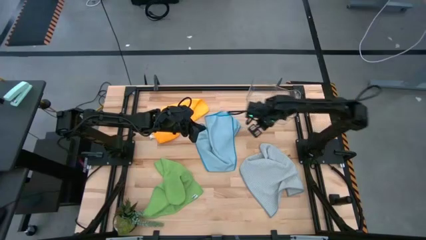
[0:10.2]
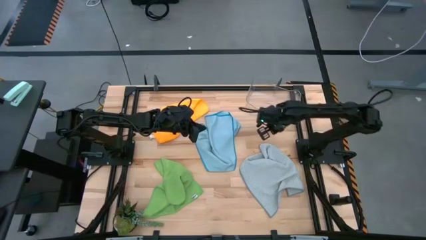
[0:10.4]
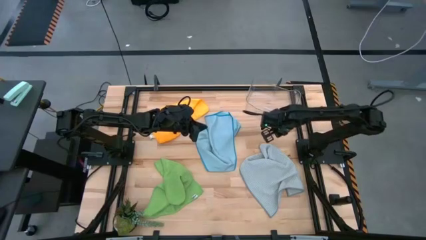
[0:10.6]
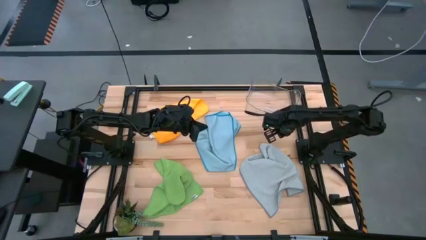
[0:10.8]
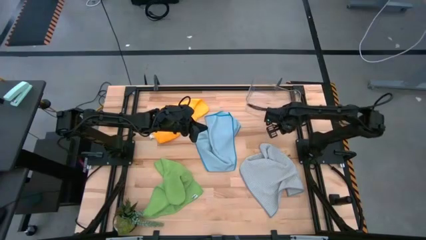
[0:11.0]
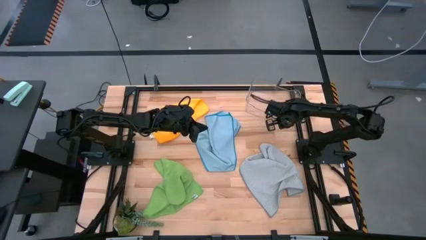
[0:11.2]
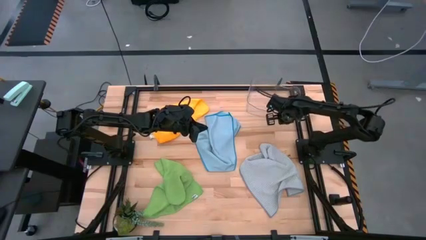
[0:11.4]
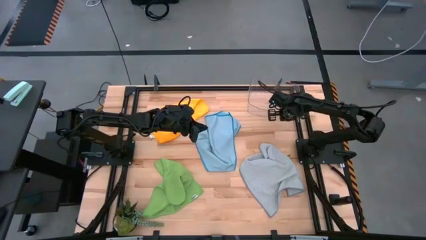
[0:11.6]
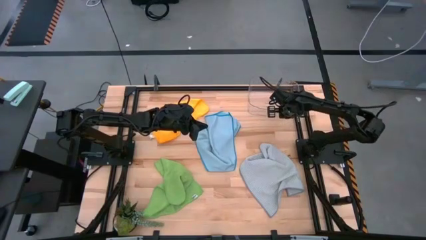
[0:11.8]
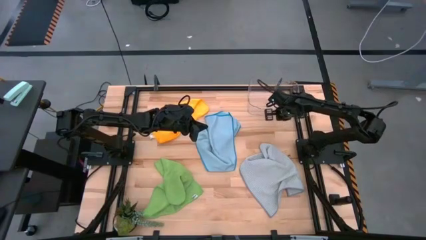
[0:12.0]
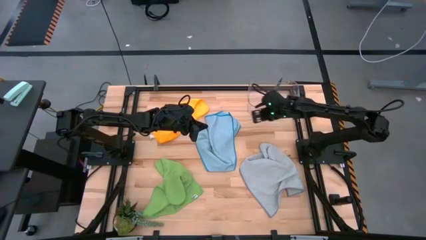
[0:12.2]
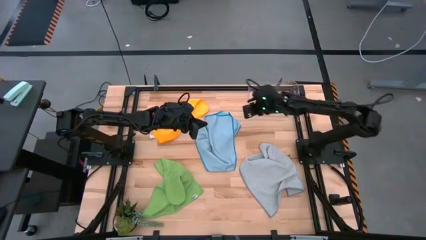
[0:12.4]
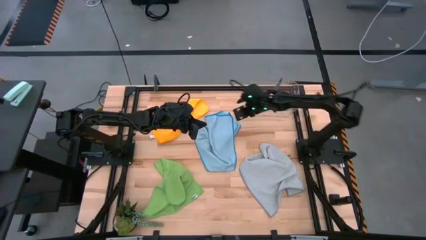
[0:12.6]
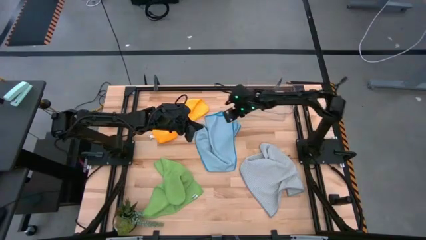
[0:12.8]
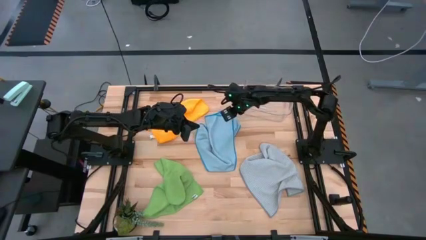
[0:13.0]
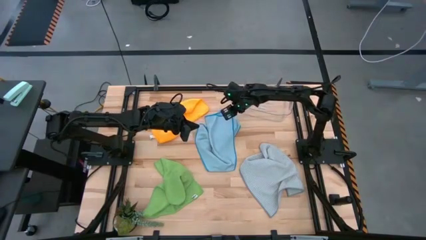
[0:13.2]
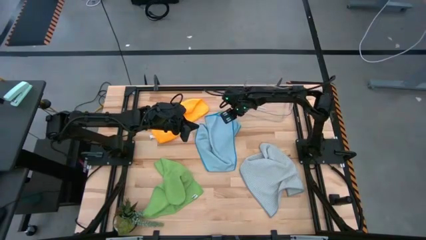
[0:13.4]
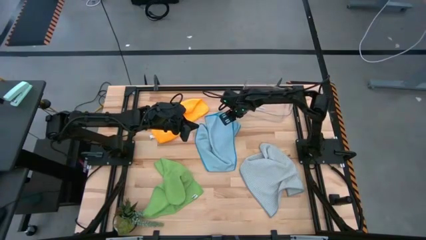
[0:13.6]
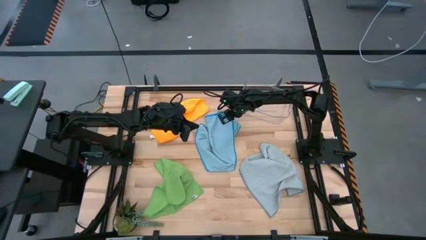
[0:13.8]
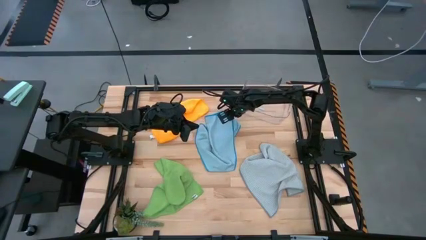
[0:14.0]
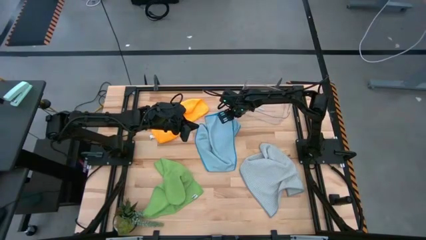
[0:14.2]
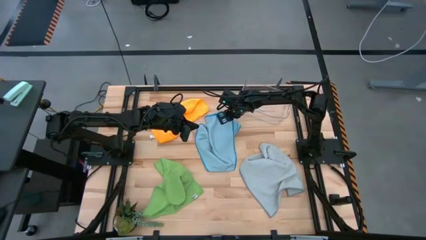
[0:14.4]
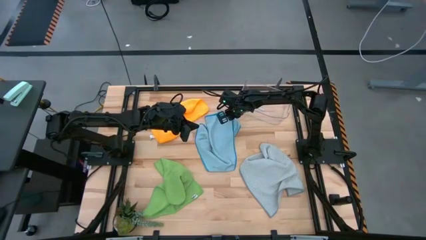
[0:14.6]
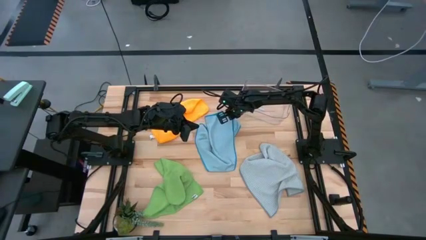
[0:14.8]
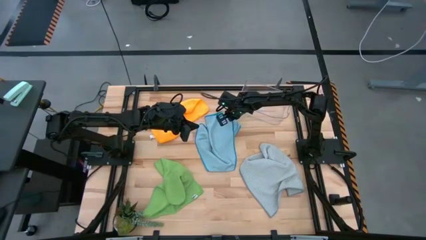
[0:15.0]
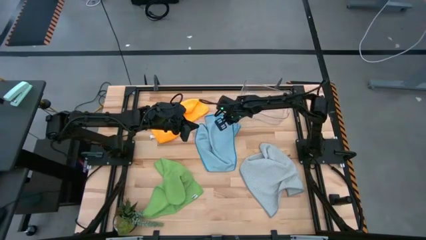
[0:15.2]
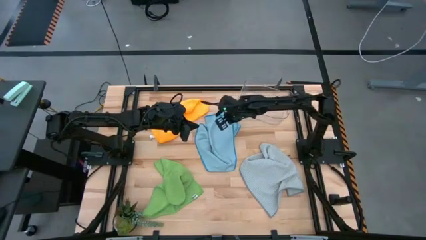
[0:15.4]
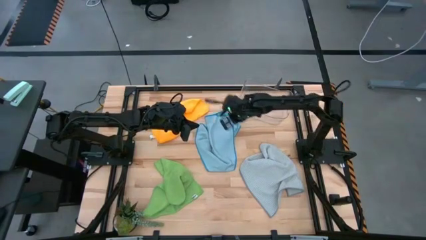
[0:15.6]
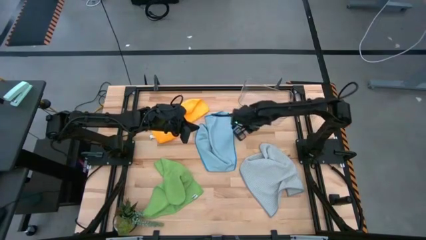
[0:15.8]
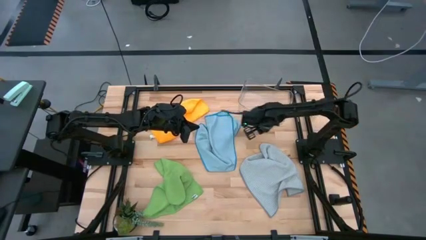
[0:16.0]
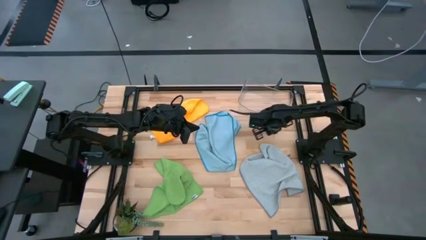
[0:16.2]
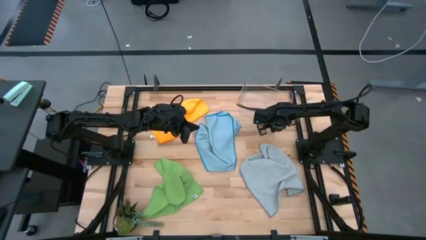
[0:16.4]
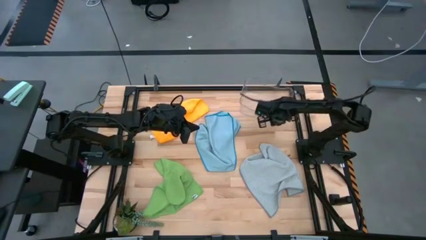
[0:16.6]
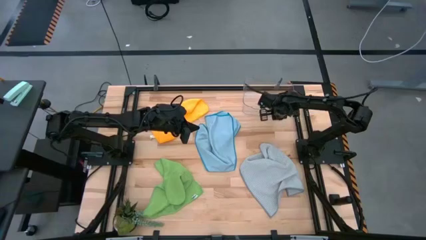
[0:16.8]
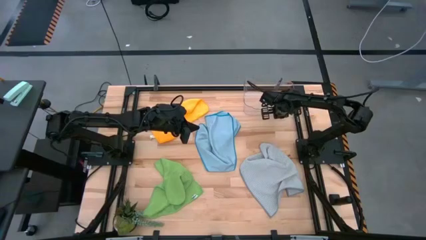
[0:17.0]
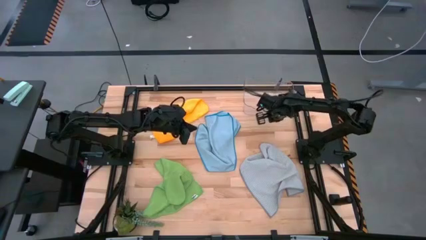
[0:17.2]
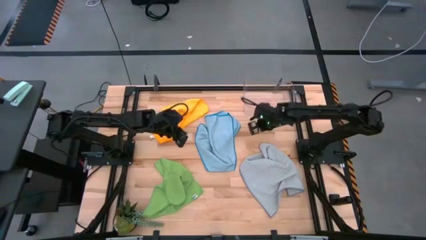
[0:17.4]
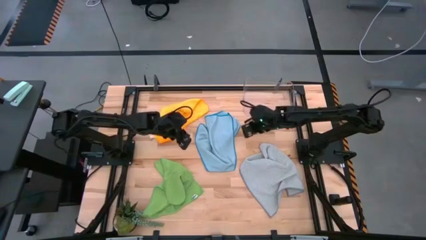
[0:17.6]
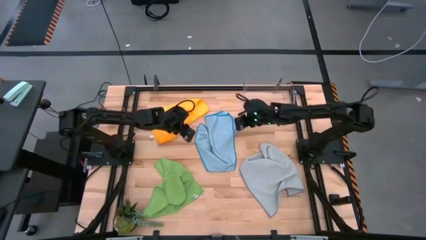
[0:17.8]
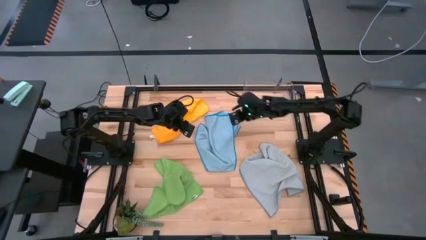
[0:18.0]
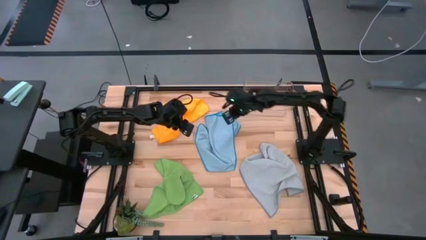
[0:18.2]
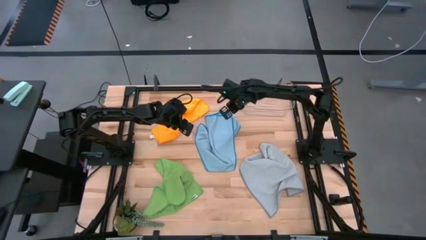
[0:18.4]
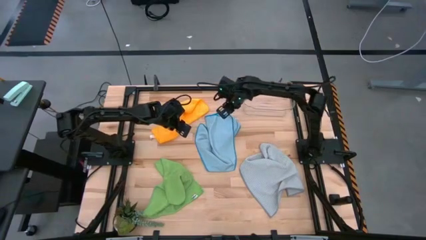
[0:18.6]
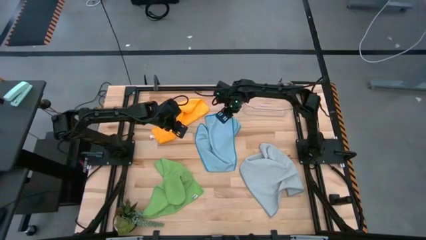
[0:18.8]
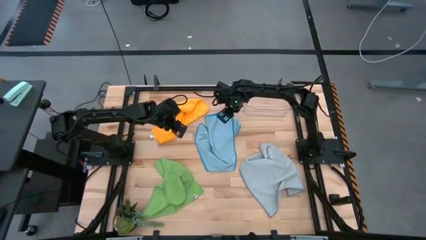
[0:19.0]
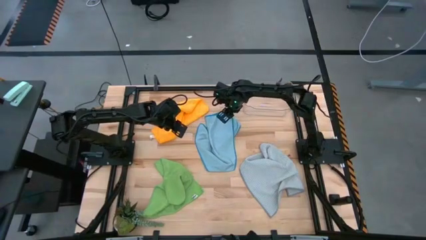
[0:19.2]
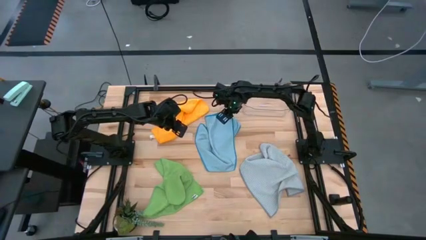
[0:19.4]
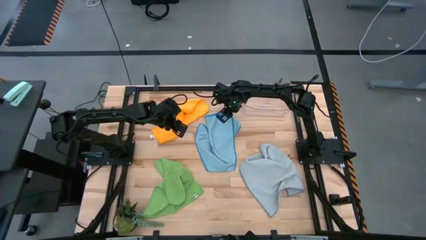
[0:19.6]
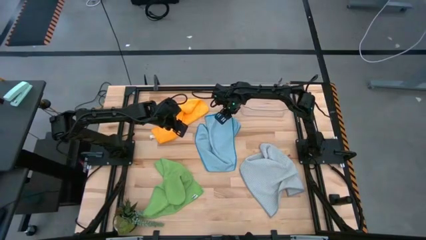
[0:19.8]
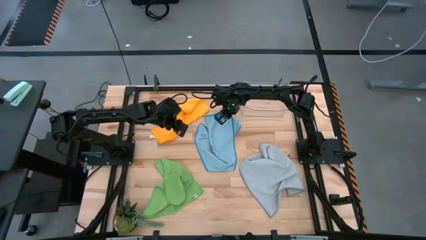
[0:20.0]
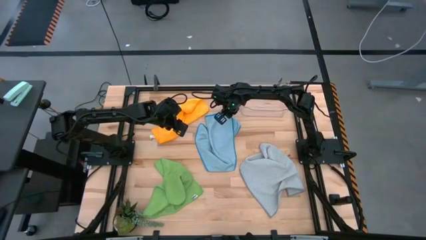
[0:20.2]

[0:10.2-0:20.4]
Task: Fold microfiber towels
Fold the blue microfiber cloth

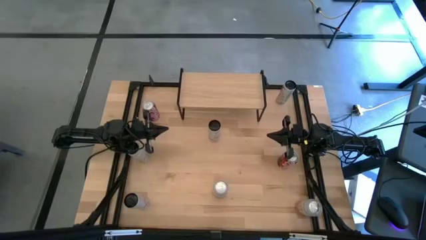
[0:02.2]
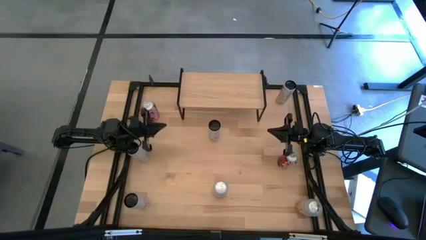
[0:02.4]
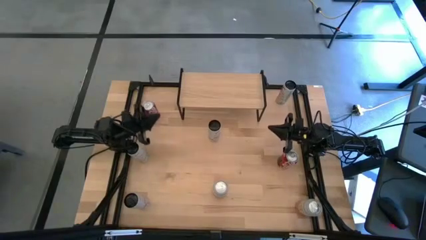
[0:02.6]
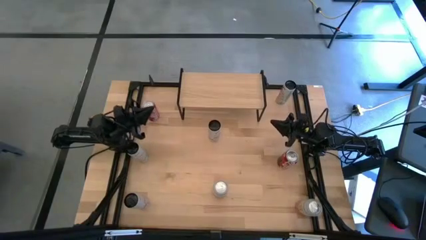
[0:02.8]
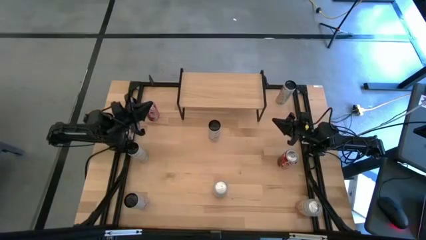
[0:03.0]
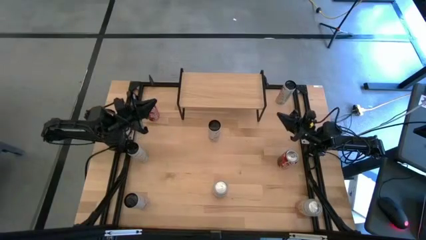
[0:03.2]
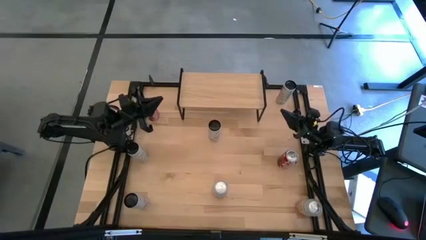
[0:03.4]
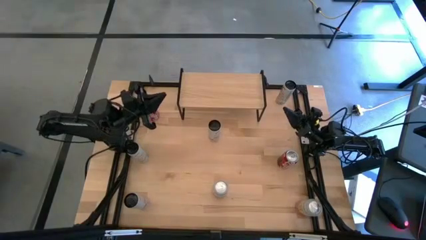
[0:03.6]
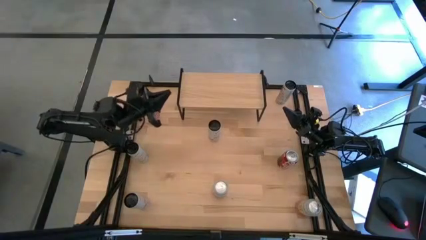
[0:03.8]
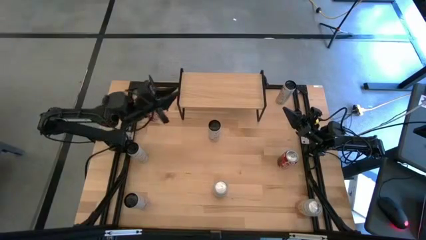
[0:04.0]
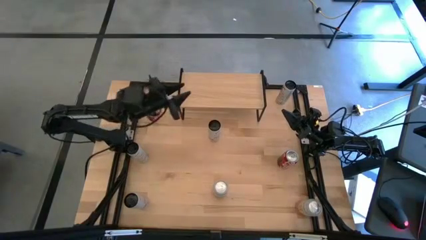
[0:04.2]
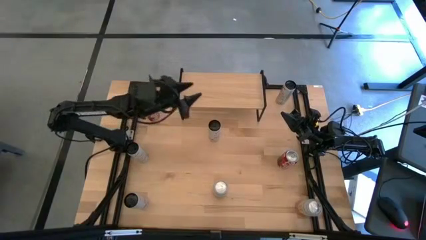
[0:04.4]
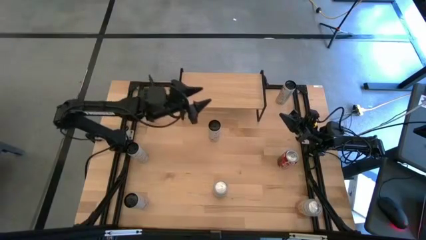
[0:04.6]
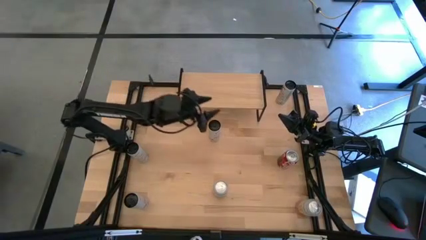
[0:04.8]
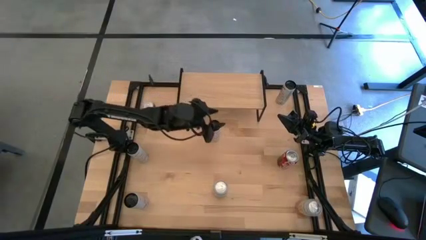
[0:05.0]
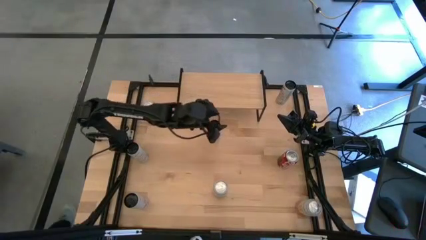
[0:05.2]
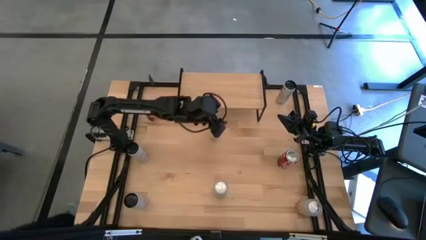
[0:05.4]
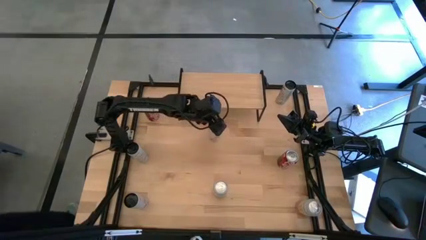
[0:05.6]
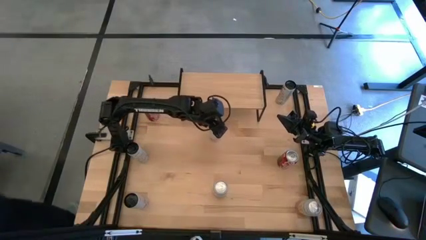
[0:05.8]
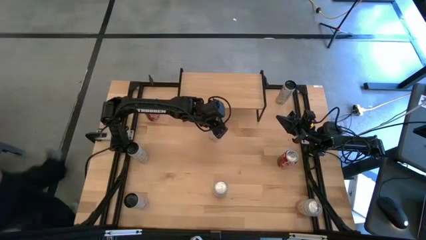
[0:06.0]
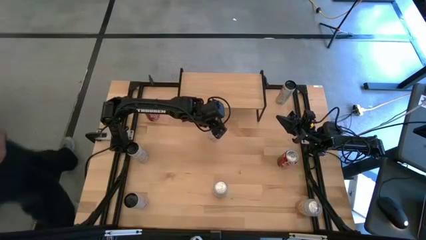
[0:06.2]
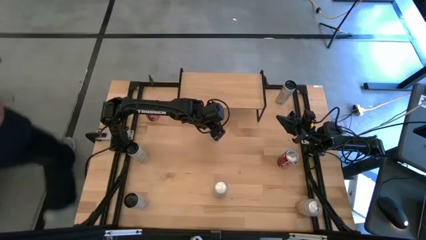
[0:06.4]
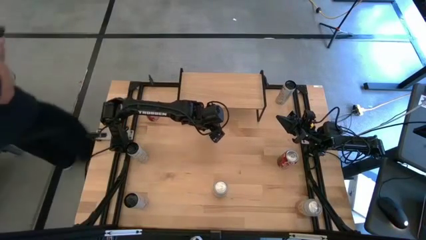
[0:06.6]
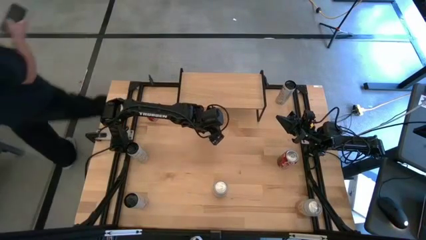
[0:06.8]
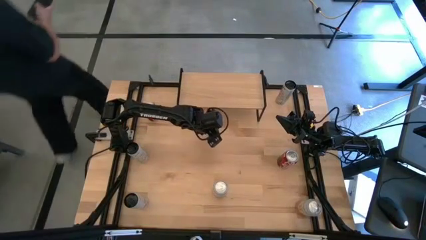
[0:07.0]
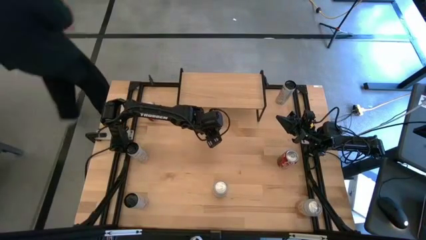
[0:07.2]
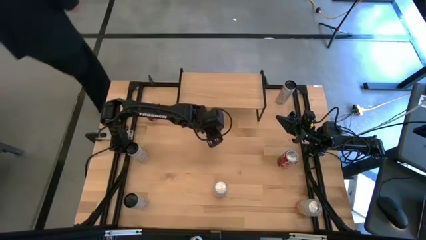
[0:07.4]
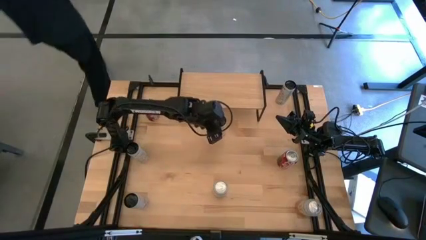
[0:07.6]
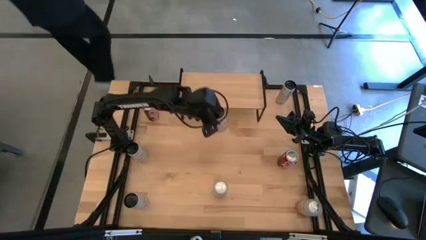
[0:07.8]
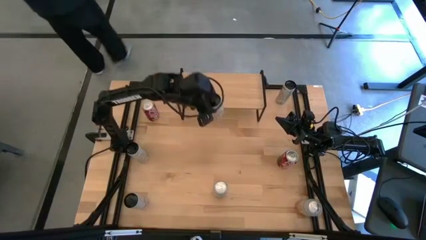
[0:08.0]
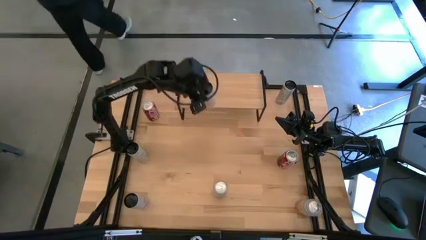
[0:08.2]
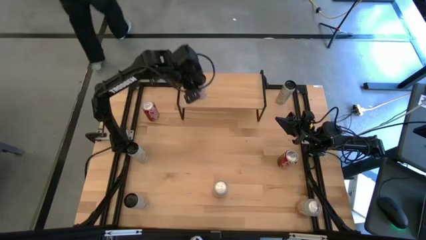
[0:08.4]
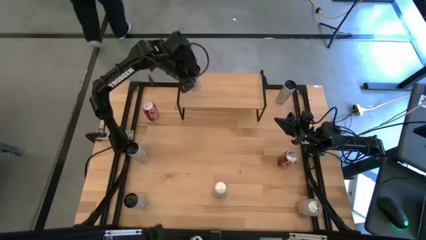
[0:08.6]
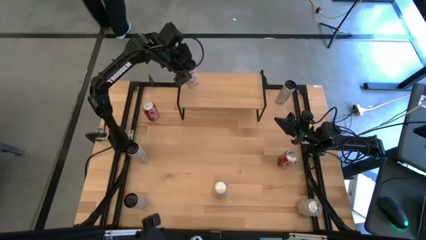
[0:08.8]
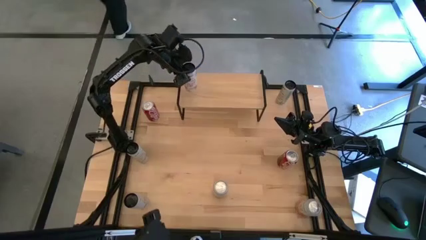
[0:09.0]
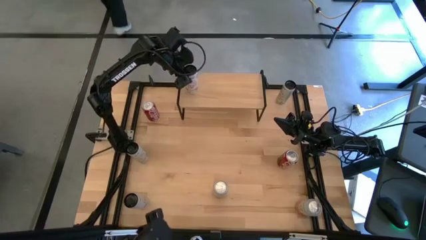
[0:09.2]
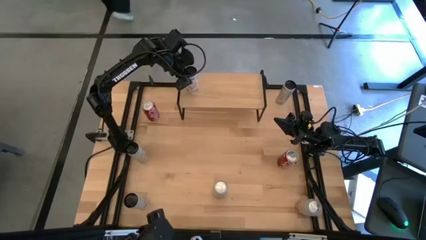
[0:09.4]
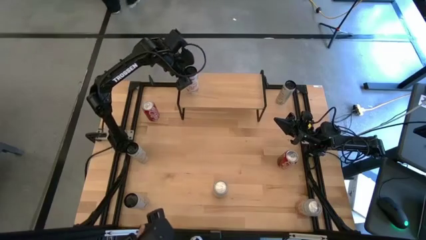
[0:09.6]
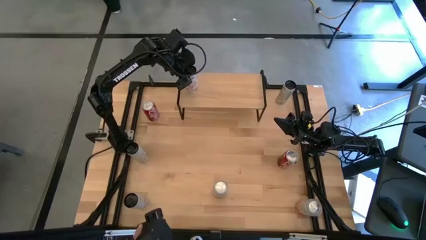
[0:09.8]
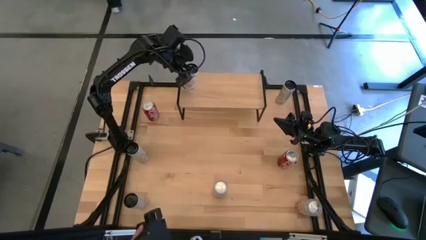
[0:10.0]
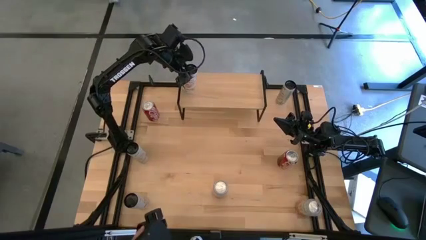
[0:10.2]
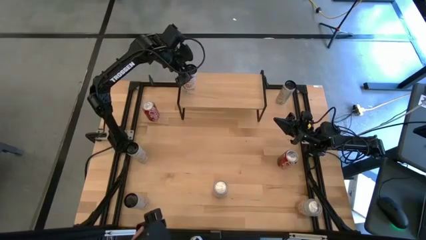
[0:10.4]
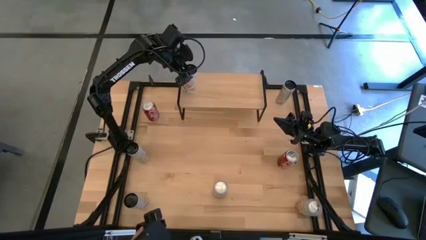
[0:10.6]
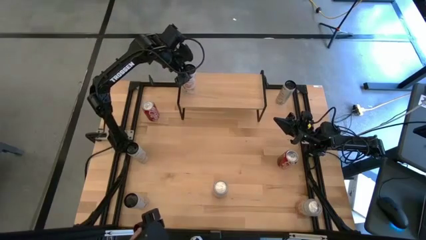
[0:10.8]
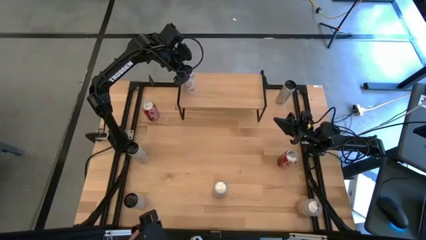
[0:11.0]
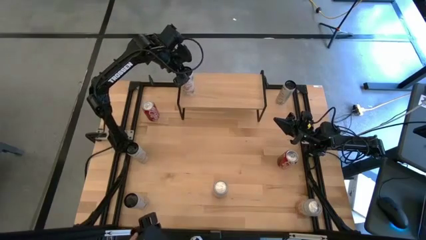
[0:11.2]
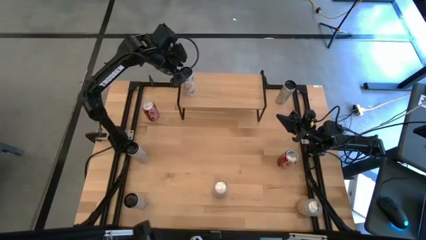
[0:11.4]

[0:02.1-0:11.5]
Task: Place canned beverage on shelf
Put the white soda can on the shelf
